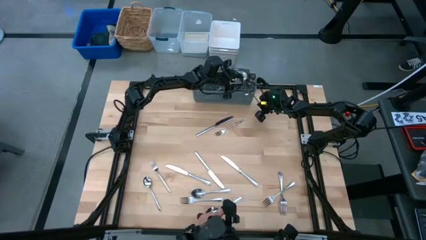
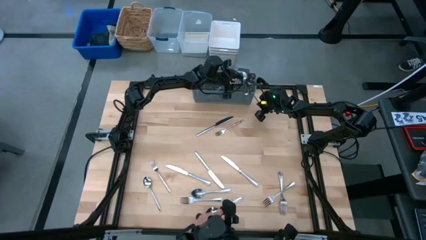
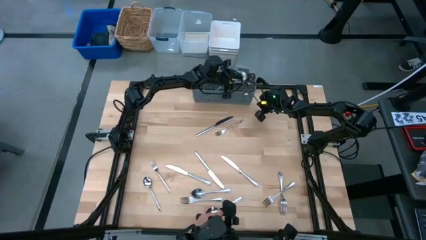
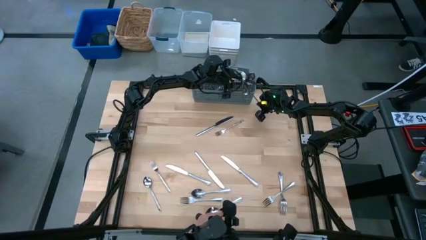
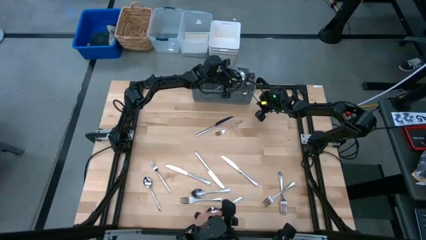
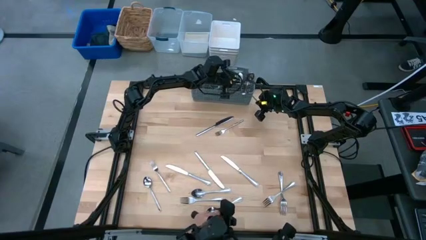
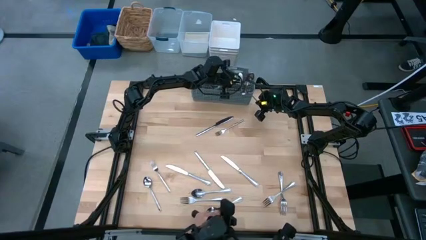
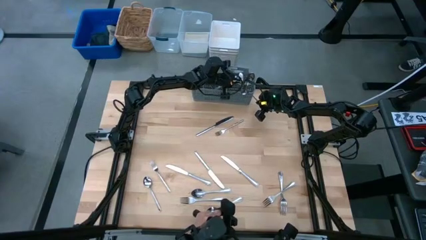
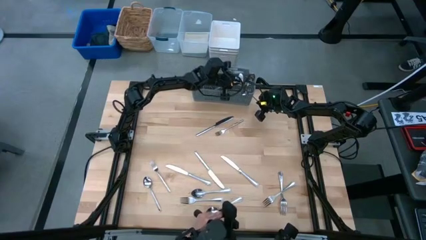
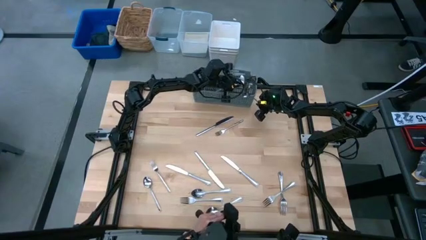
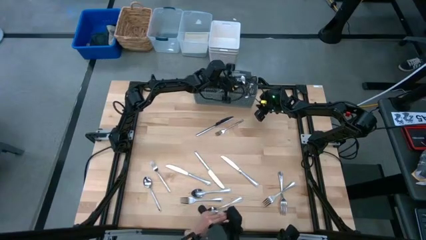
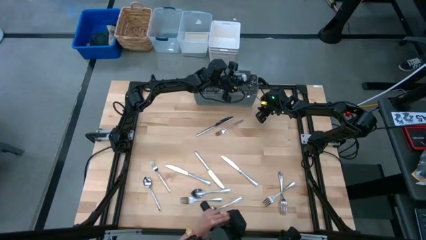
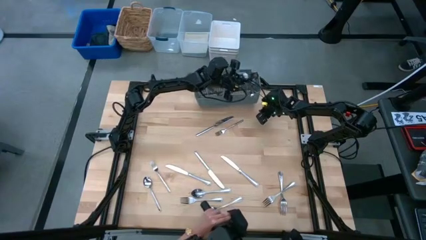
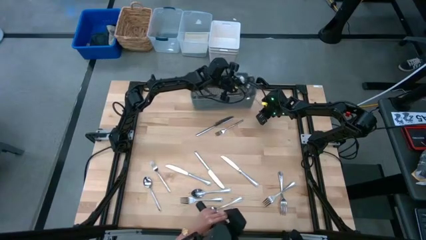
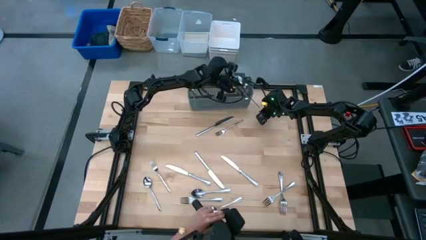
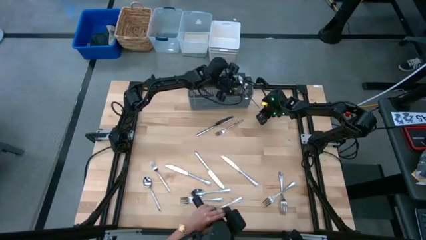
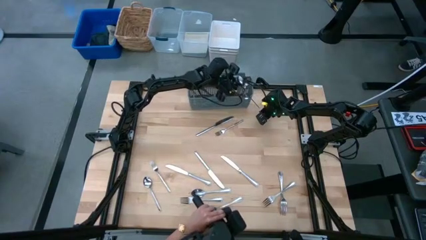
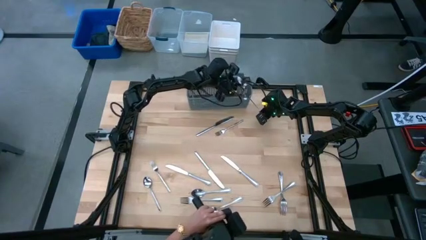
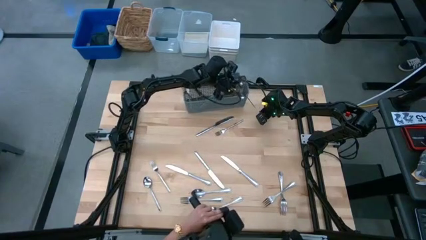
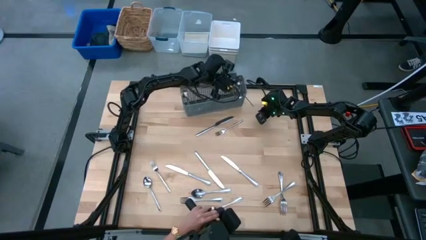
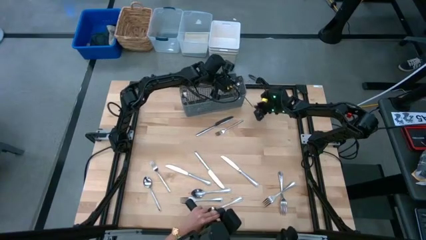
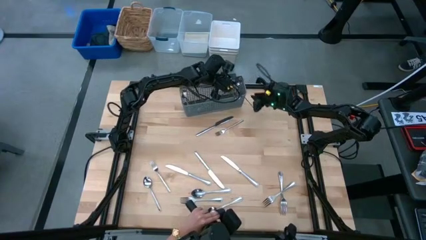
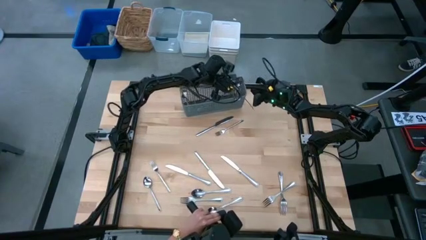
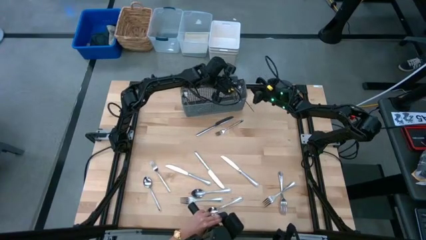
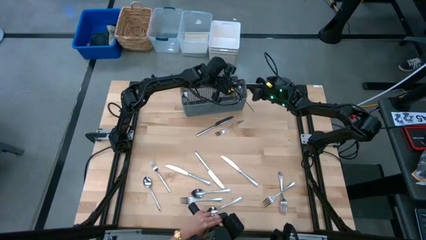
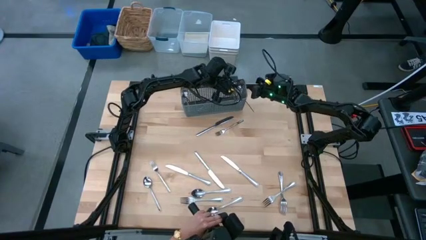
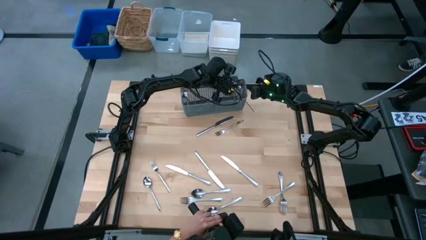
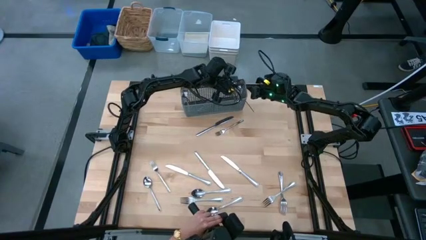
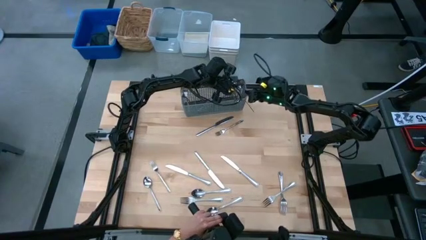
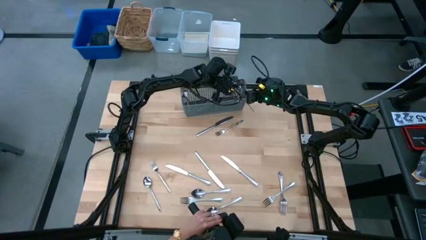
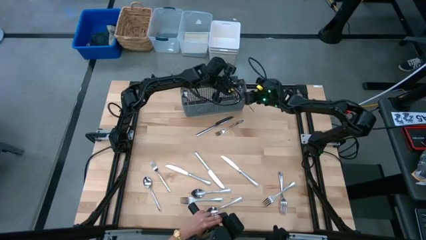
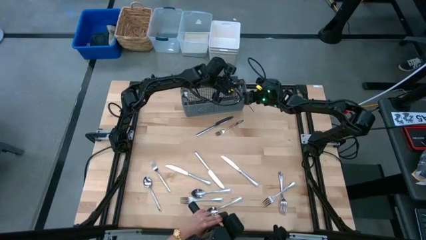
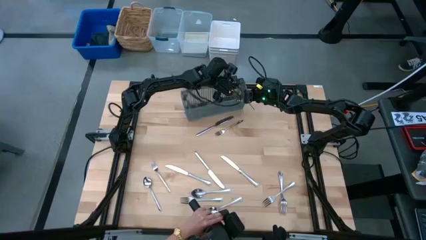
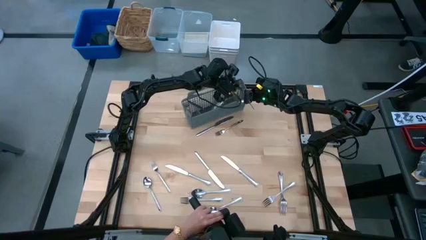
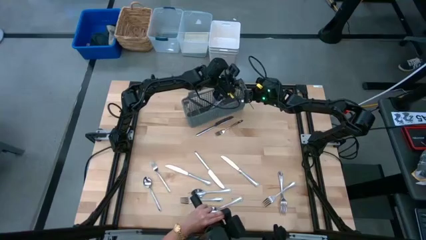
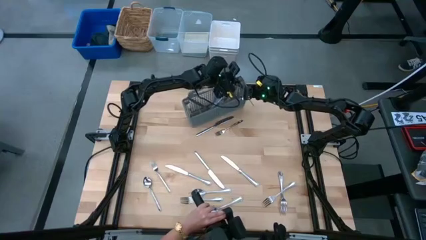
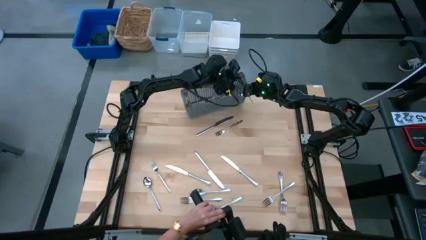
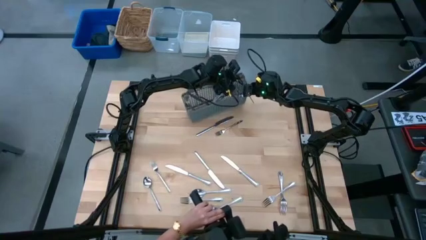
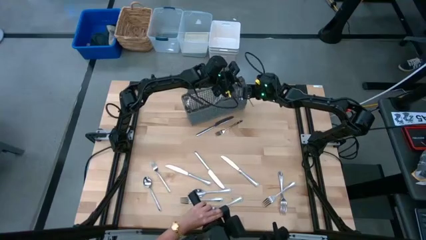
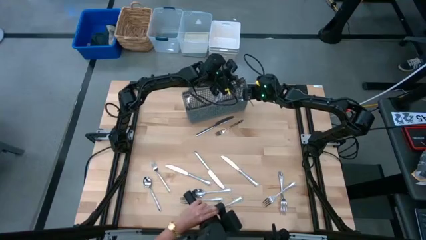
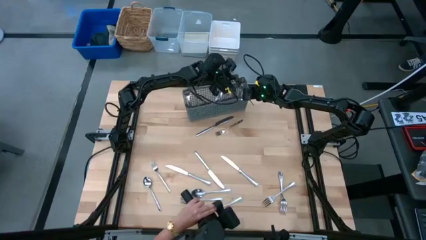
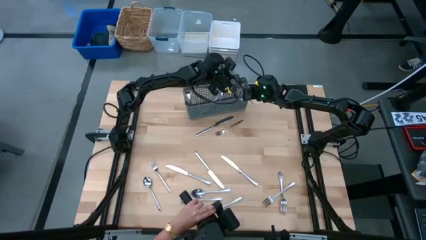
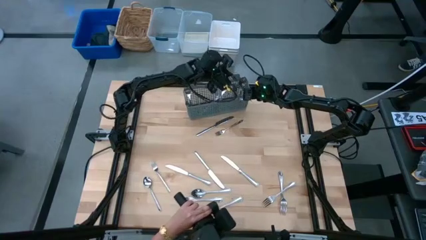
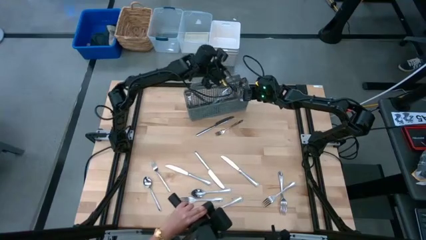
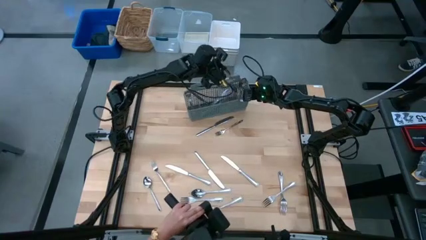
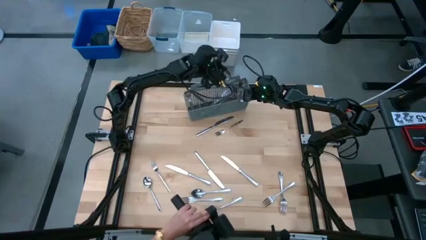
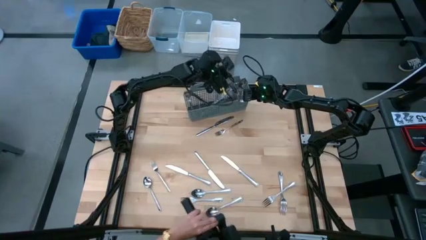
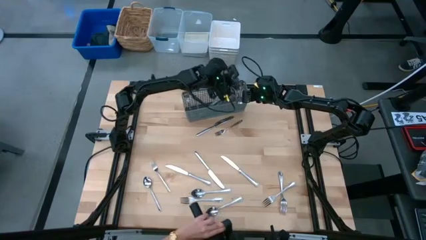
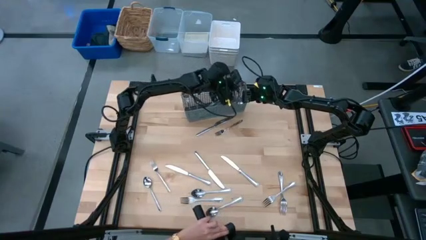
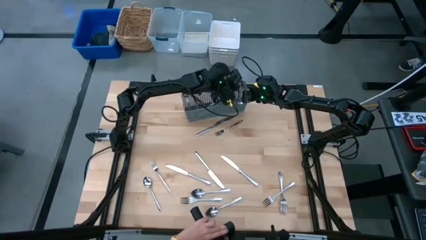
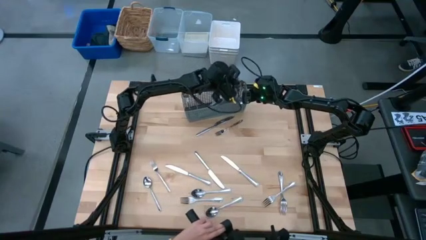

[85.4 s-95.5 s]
Adjust the silver spoon in the dishwasher utensil holder

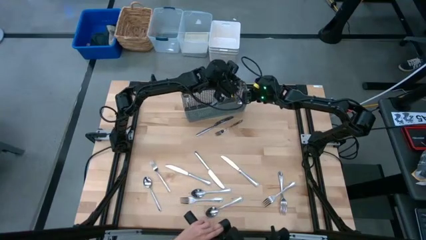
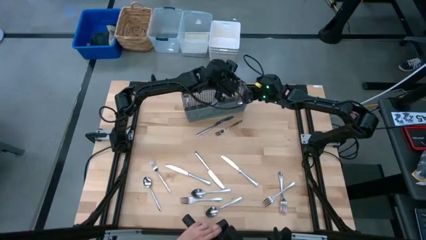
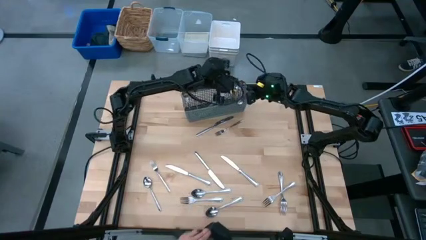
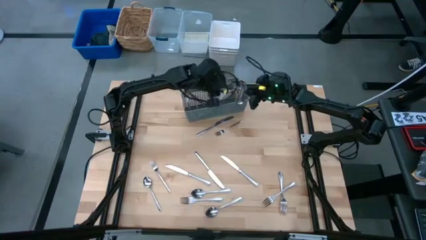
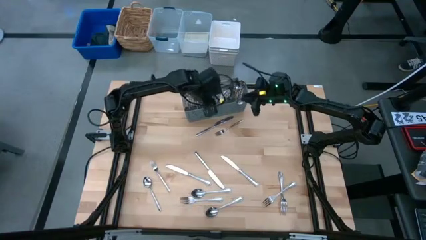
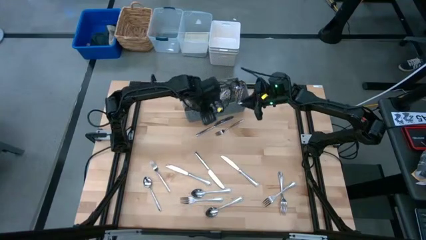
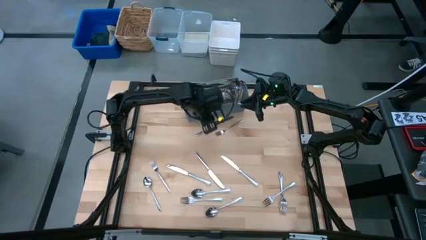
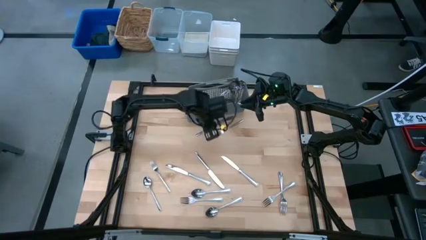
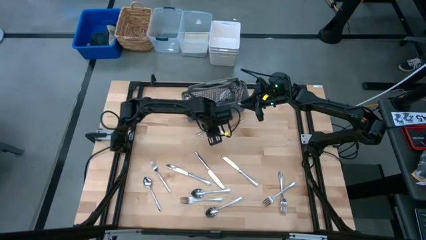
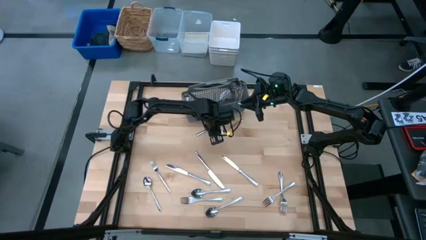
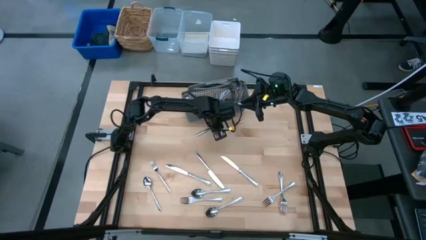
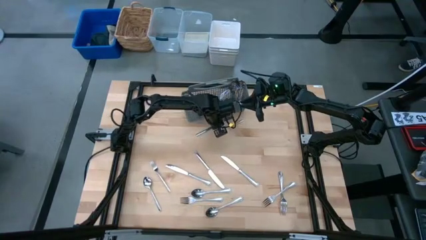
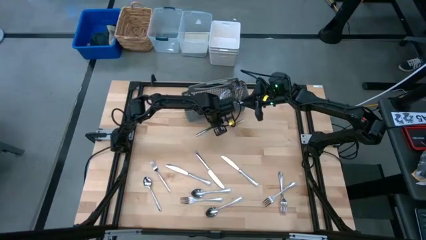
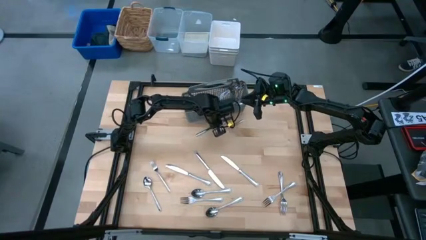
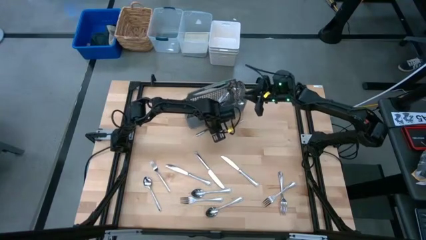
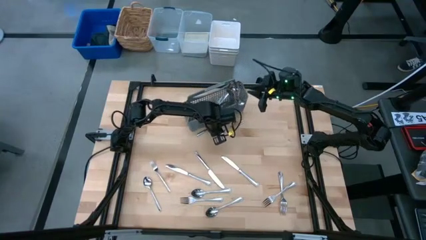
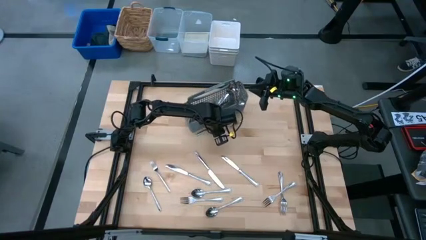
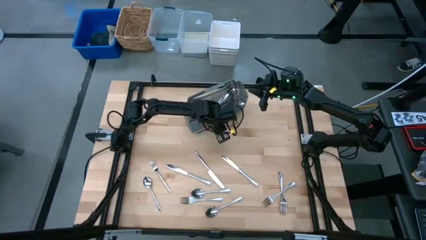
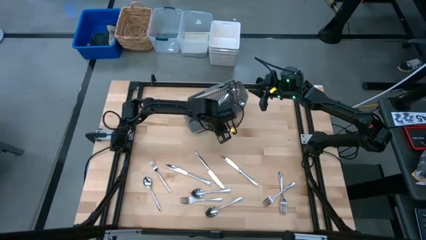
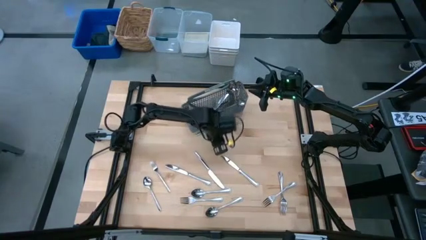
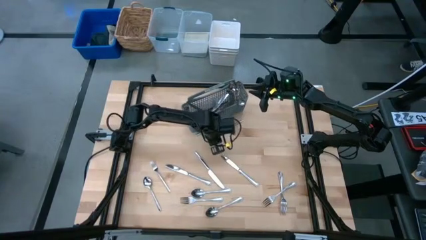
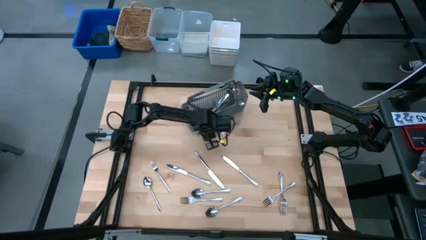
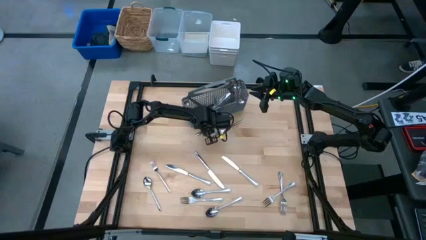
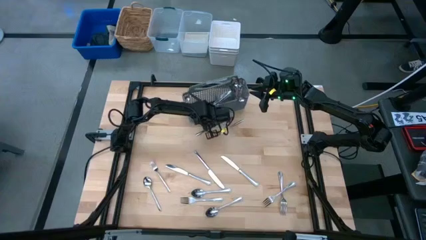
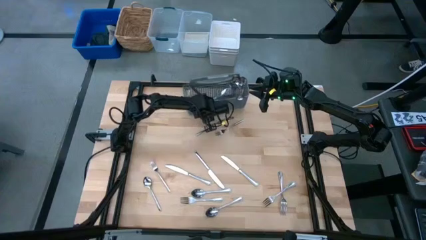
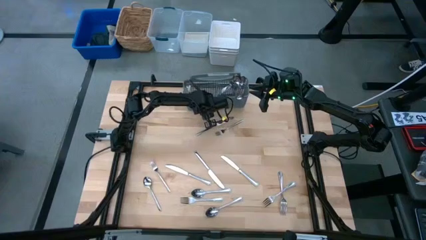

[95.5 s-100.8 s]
Move the dishwasher utensil holder
